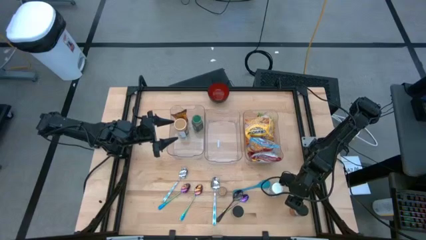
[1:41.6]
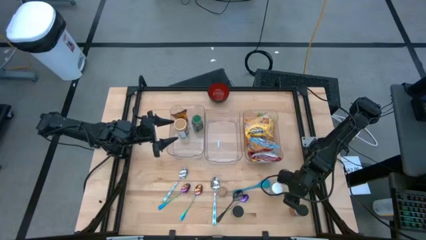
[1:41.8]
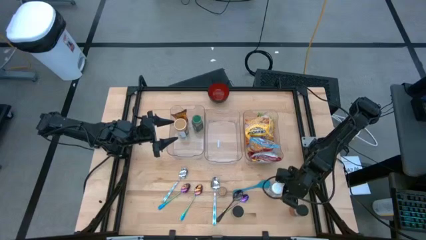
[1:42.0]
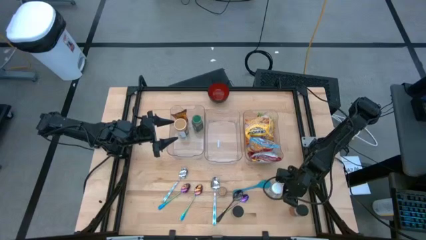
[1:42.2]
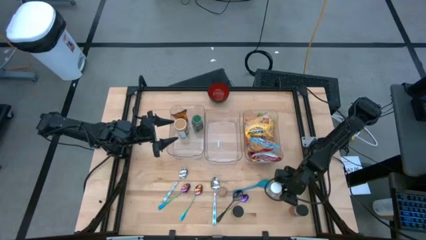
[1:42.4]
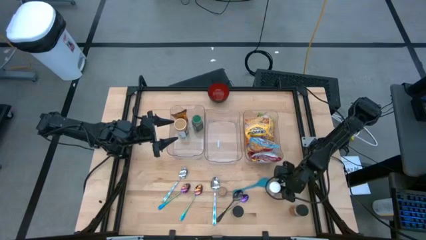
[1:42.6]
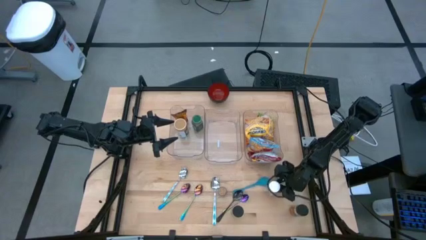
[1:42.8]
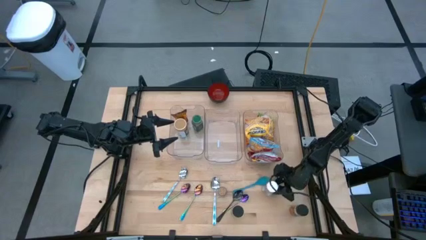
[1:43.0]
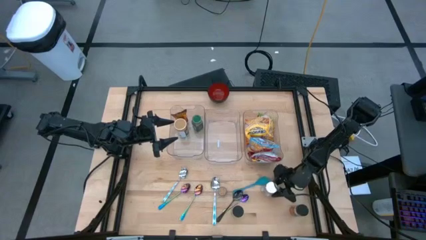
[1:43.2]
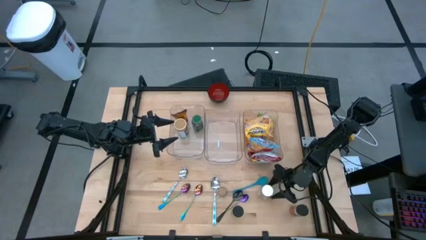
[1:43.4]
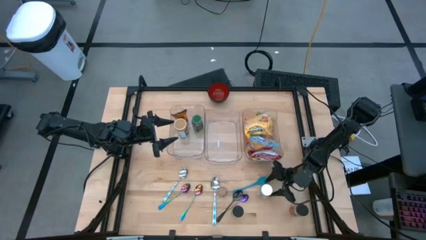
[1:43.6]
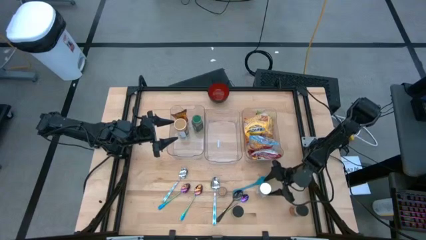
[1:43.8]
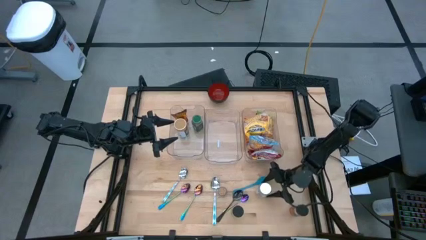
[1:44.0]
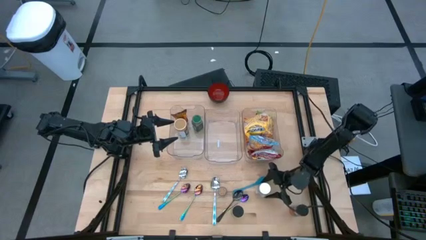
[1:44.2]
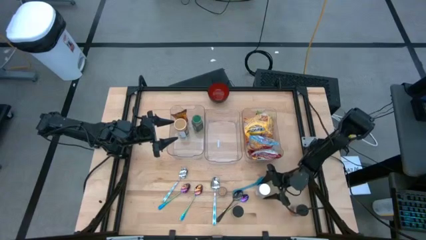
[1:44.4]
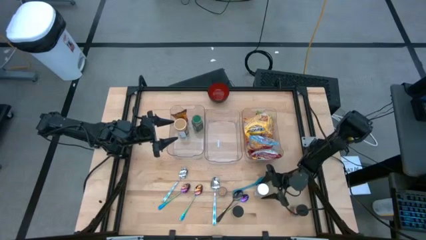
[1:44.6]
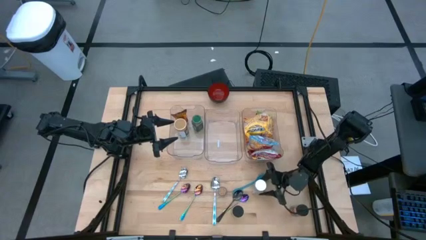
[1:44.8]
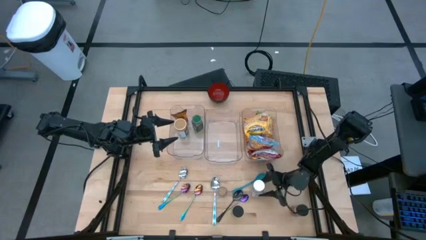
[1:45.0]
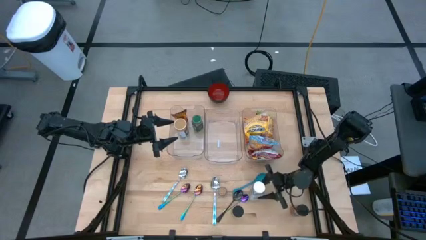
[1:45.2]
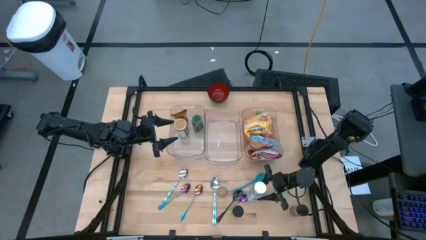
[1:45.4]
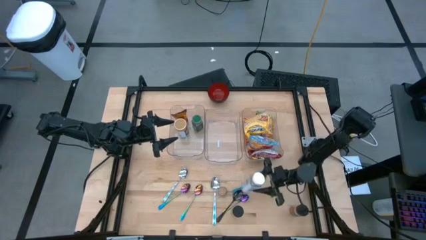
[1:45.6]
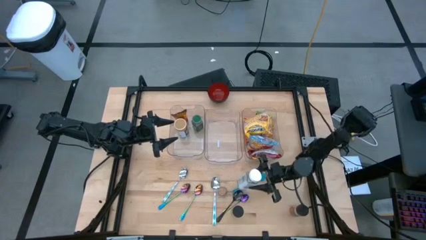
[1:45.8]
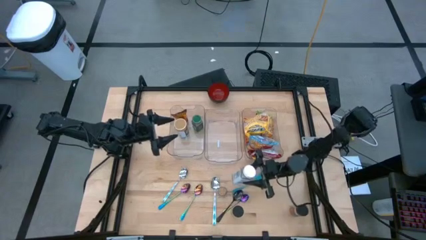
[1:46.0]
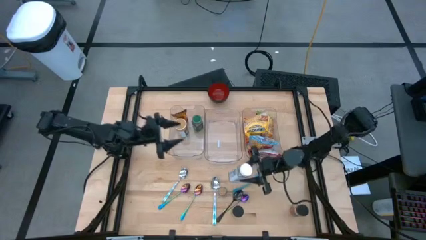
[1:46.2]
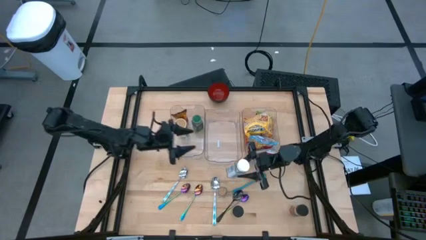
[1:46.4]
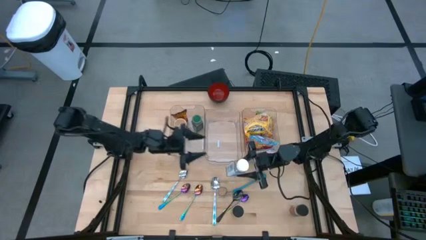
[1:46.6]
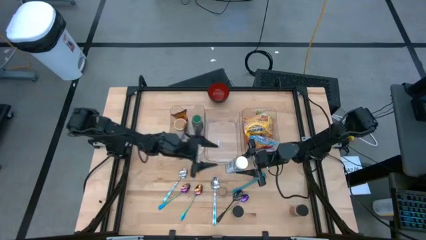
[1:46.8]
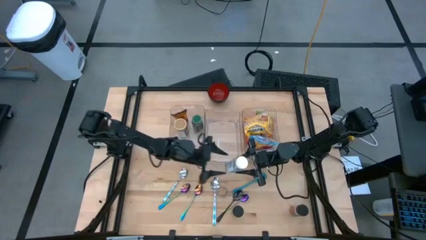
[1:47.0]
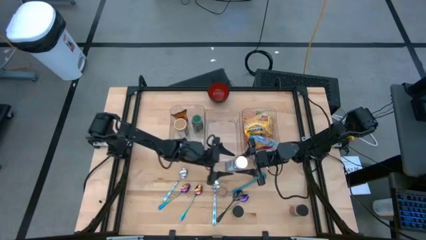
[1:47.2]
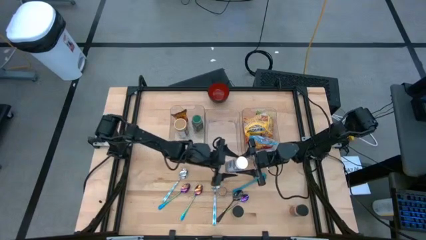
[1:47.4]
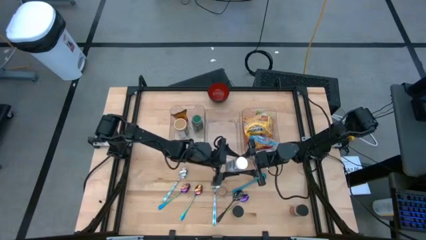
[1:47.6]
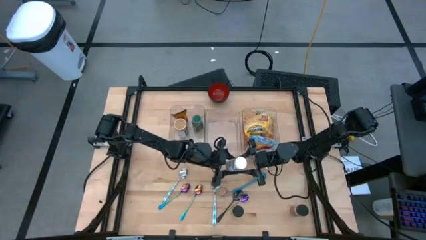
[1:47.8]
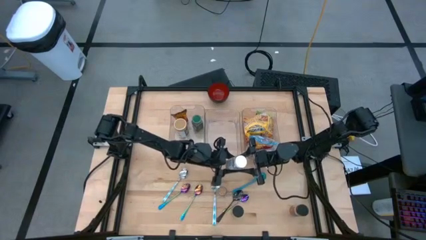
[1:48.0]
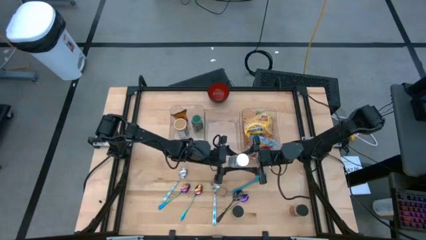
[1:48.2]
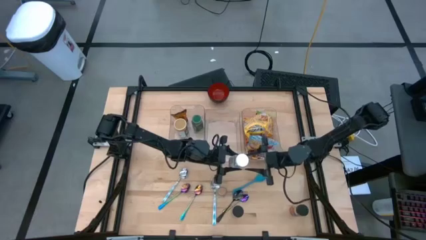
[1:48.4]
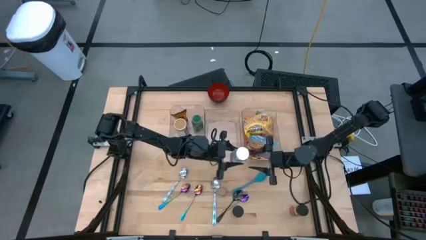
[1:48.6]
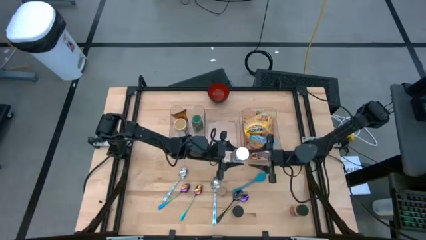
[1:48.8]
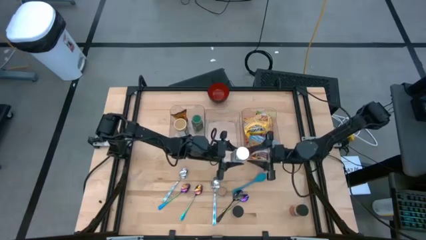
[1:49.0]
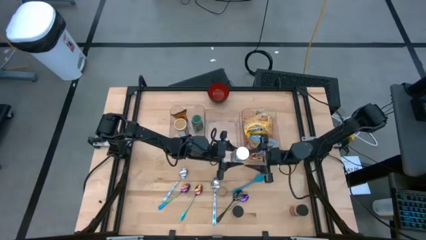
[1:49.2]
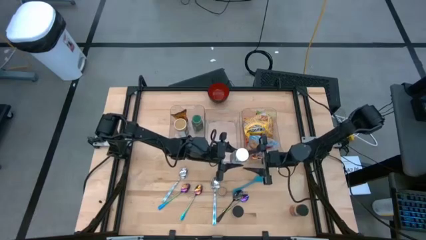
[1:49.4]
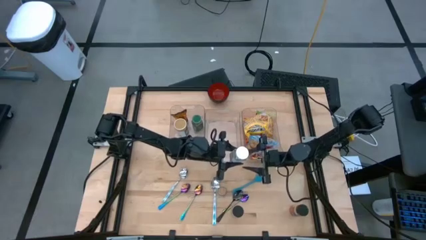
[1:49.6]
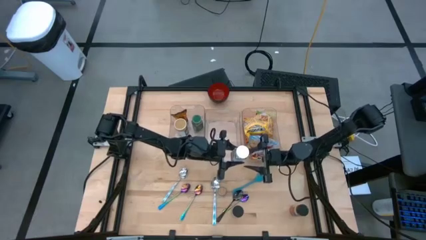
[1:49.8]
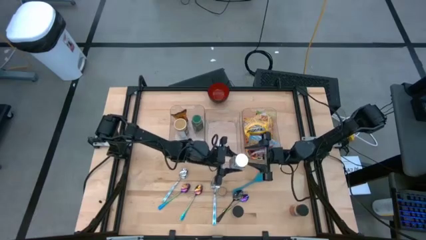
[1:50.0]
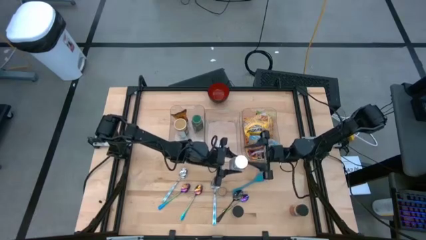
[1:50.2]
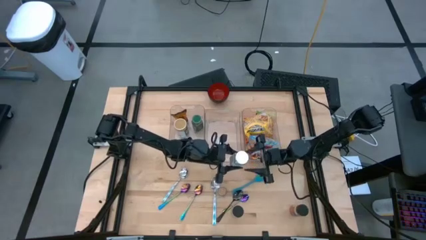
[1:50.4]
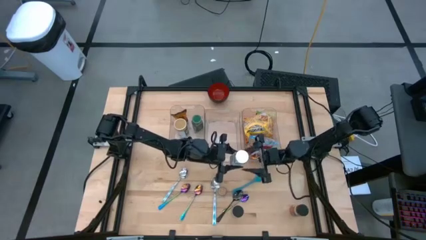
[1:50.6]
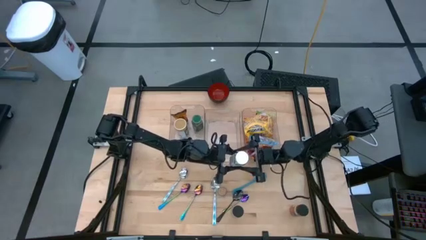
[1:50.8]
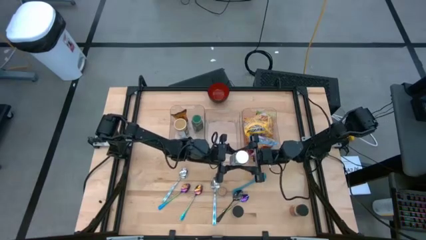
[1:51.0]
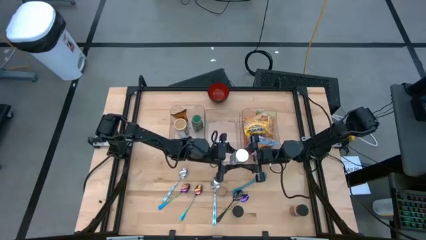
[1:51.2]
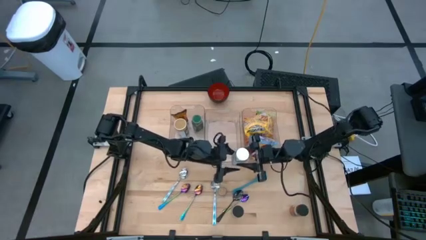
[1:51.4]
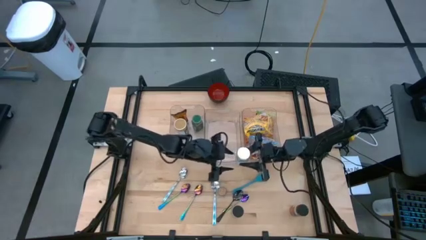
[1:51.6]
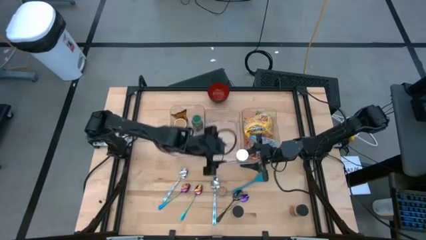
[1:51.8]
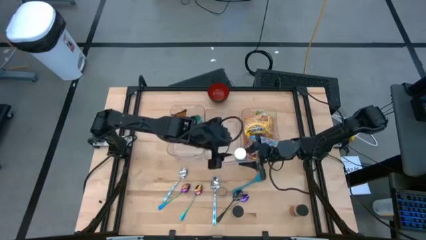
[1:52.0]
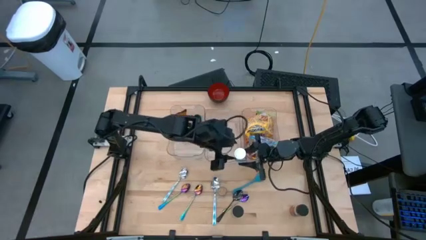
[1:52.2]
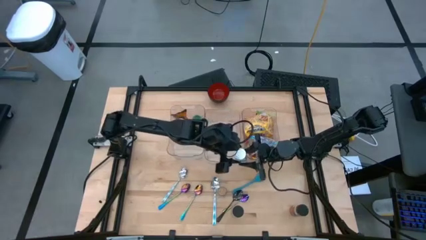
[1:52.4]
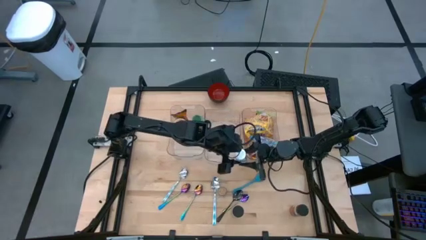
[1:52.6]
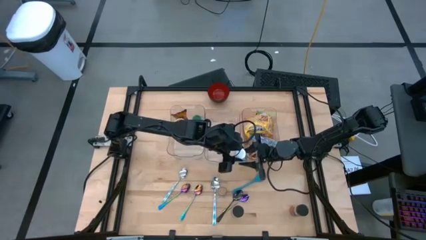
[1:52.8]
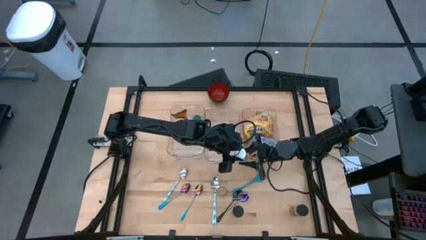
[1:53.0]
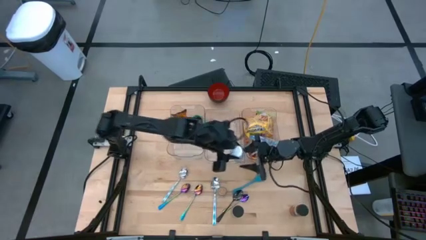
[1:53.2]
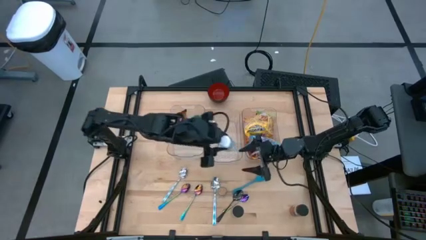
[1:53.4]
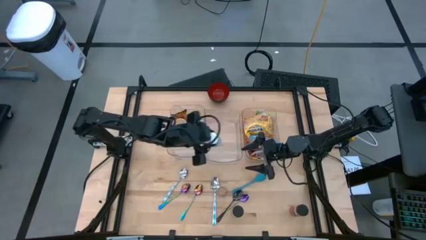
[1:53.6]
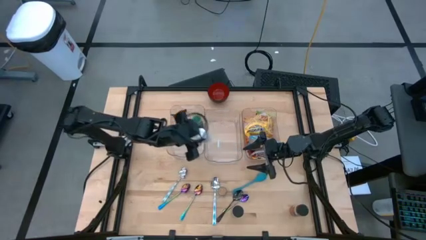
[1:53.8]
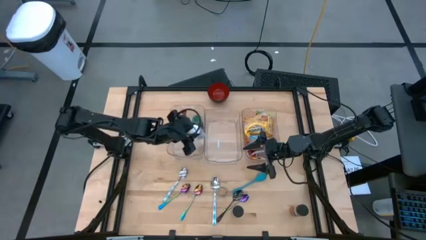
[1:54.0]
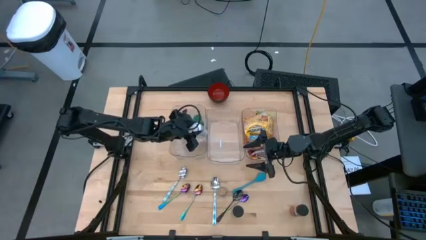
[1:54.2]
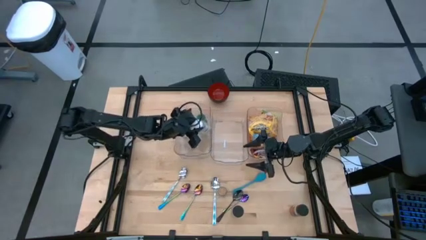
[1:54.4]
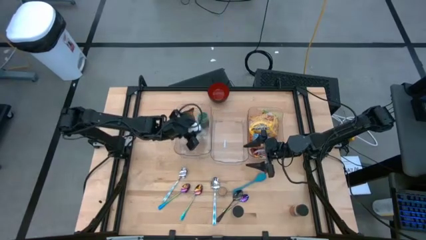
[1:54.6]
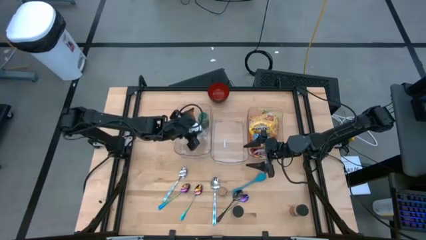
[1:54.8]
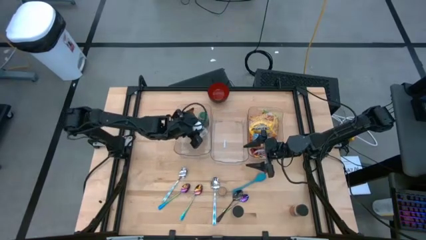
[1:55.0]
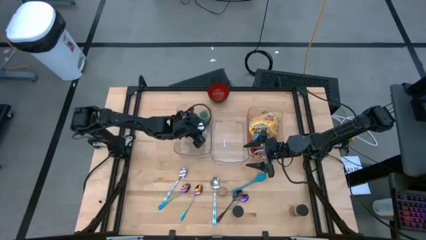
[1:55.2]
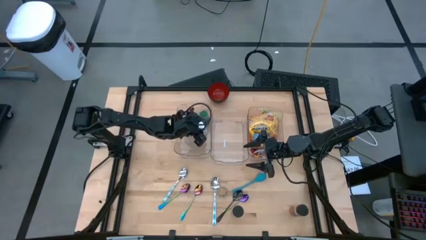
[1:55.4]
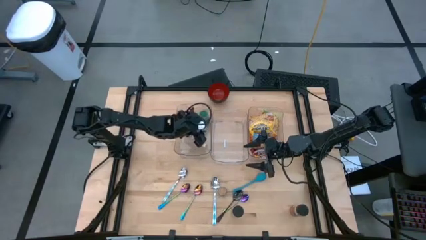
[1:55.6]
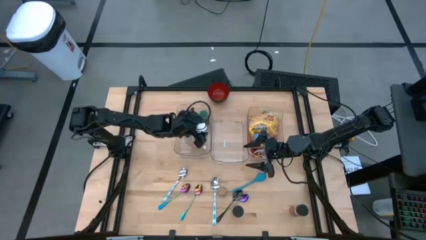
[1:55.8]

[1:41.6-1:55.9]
Task: Pick & Place Food Item
Put the white seasoning bottle into the left transparent bin
